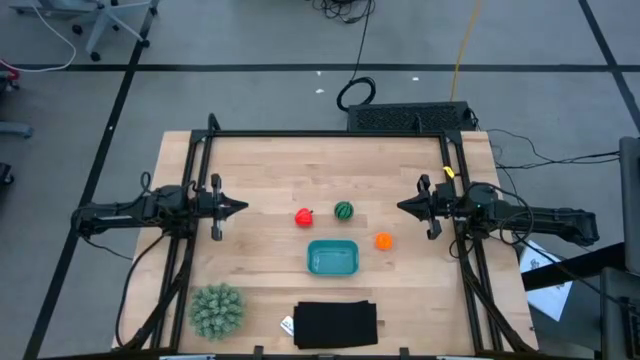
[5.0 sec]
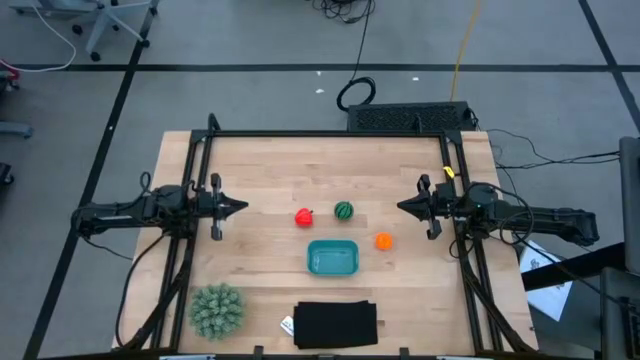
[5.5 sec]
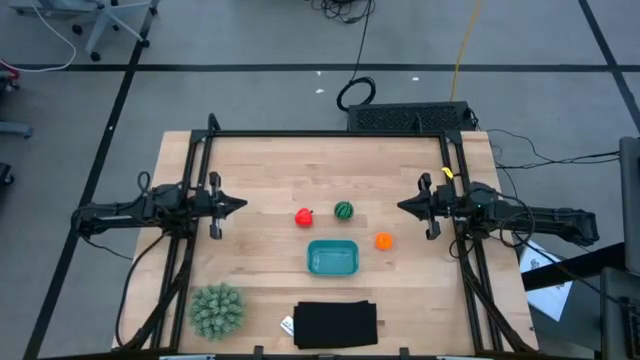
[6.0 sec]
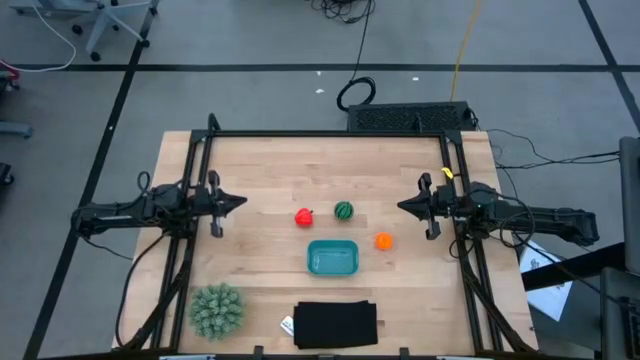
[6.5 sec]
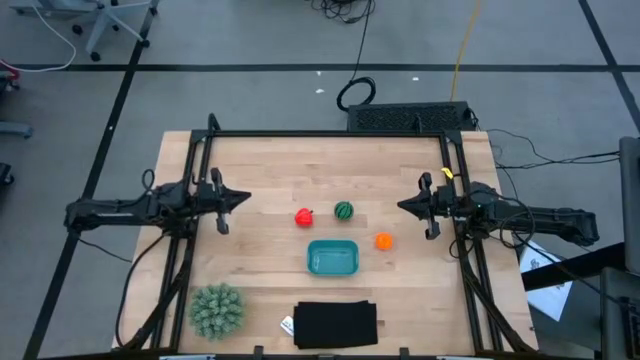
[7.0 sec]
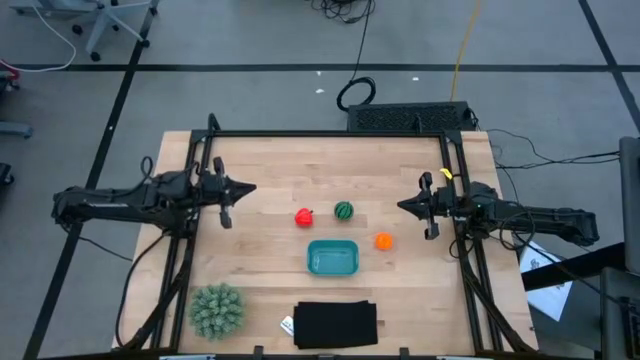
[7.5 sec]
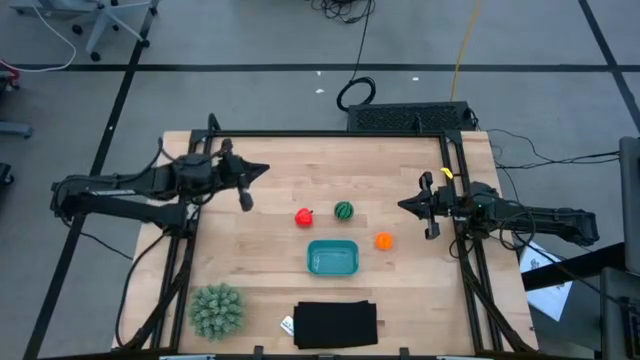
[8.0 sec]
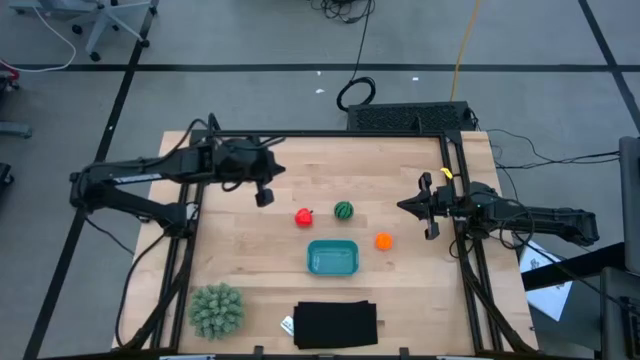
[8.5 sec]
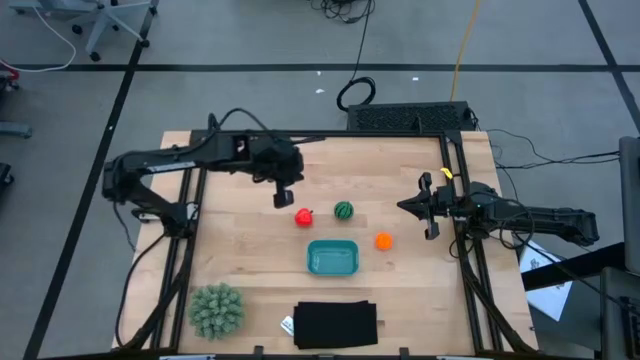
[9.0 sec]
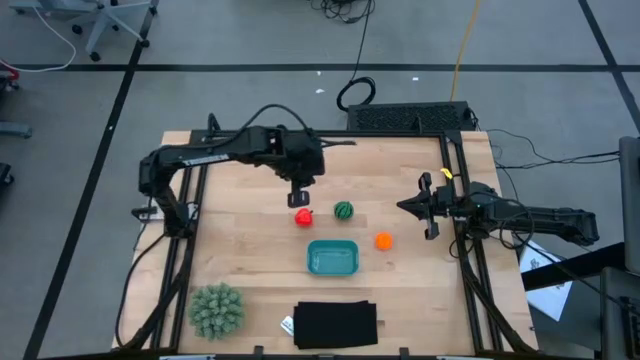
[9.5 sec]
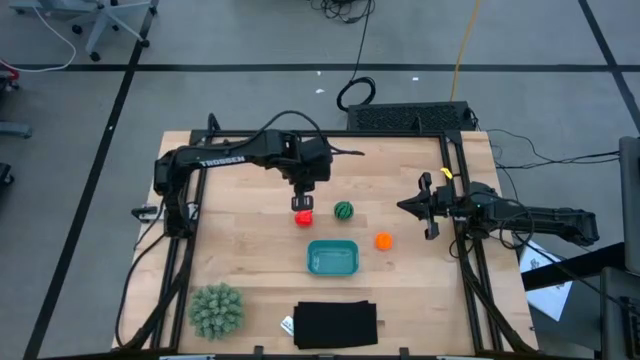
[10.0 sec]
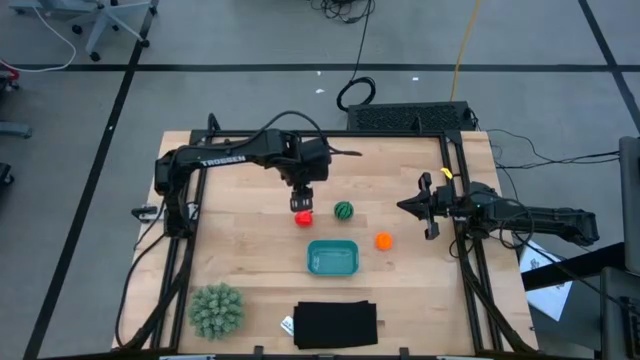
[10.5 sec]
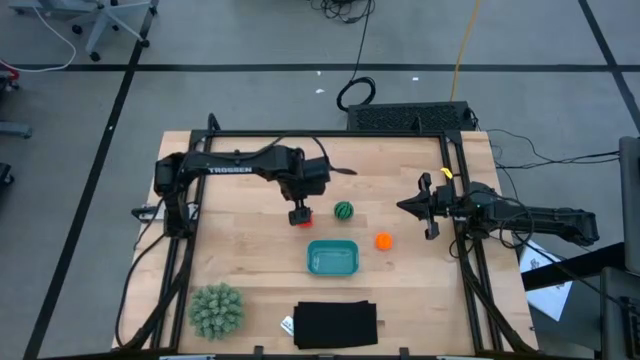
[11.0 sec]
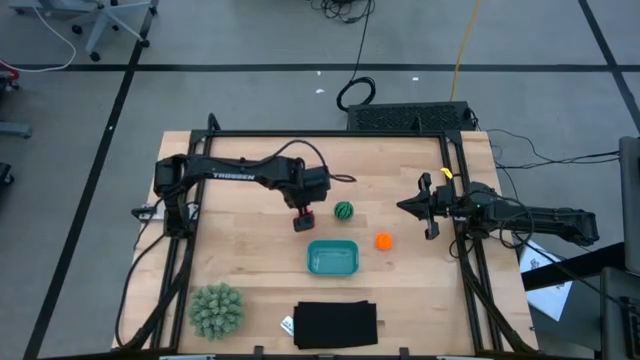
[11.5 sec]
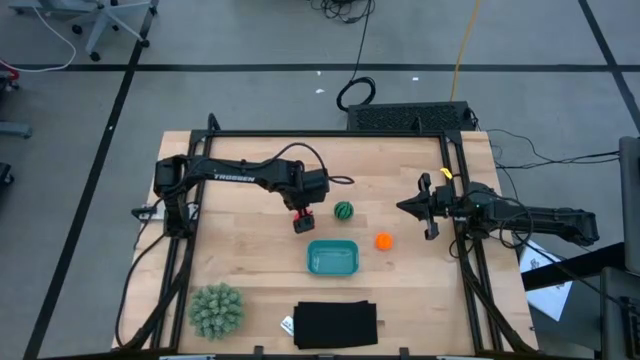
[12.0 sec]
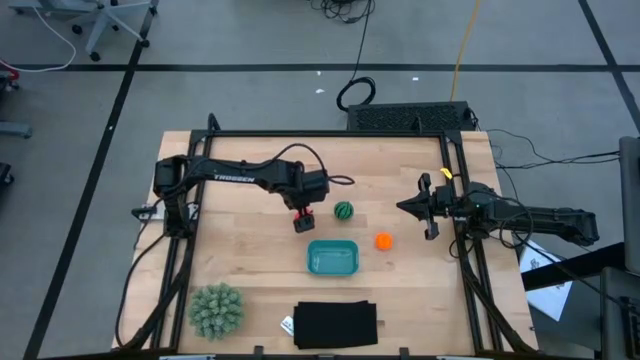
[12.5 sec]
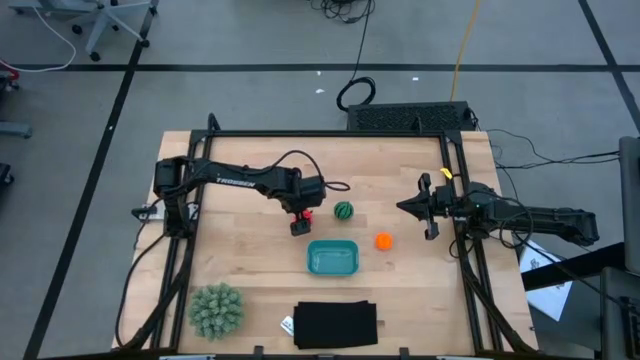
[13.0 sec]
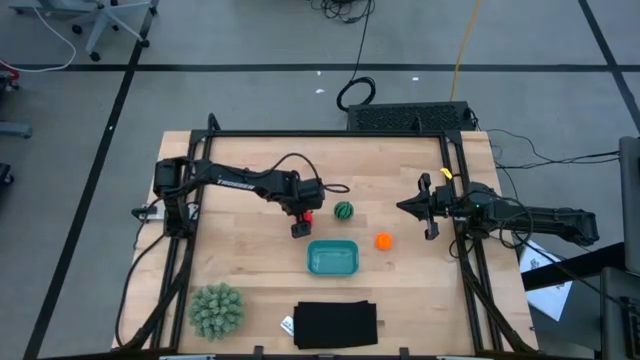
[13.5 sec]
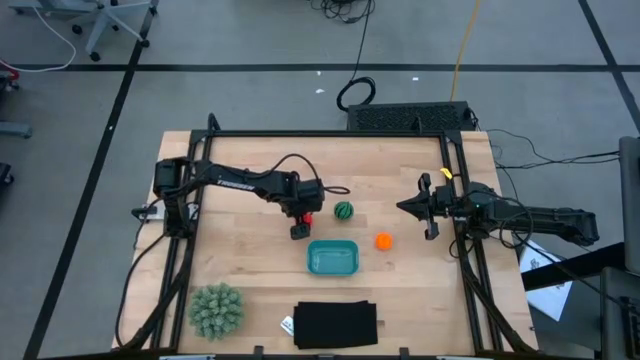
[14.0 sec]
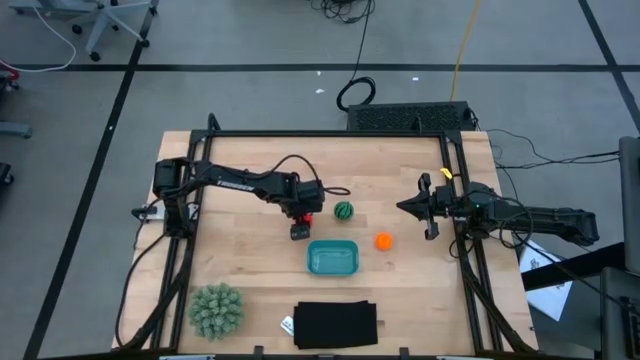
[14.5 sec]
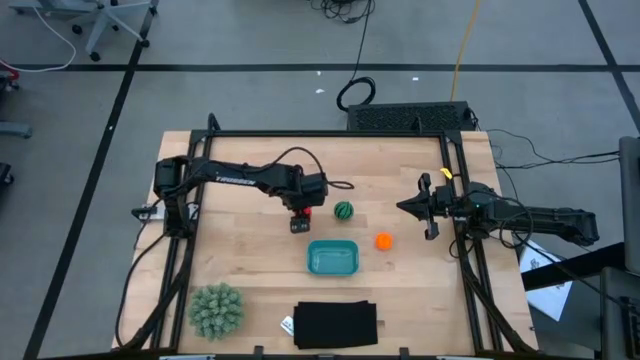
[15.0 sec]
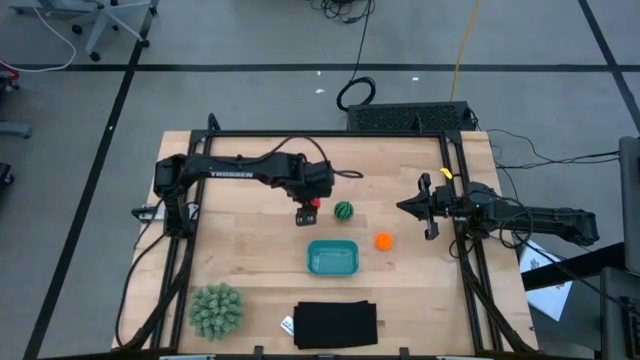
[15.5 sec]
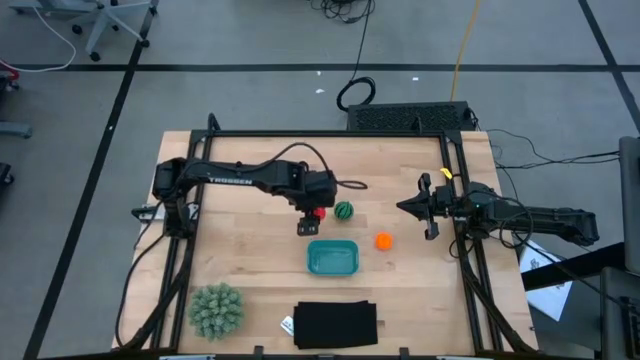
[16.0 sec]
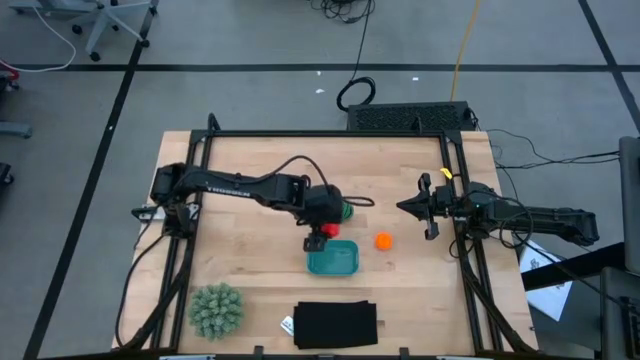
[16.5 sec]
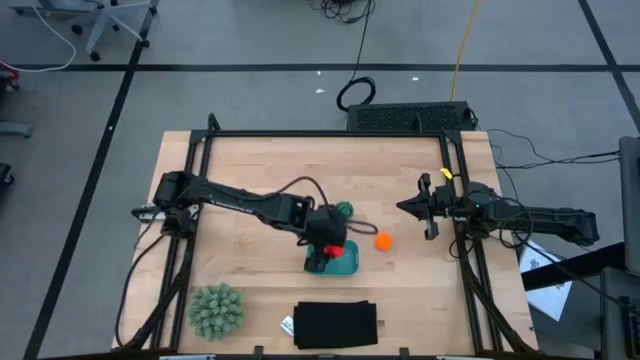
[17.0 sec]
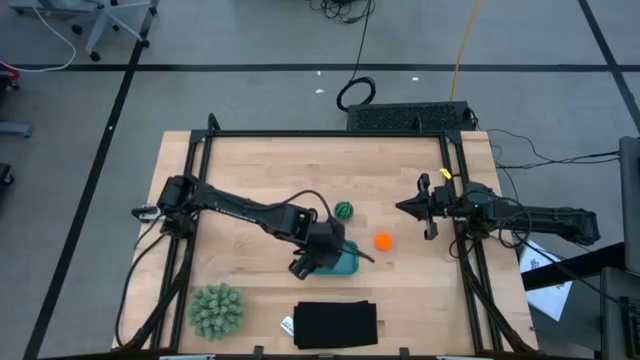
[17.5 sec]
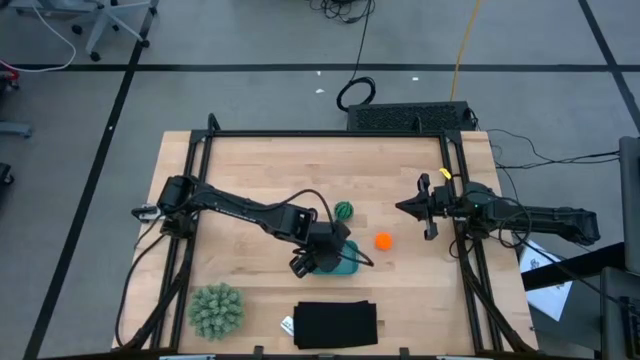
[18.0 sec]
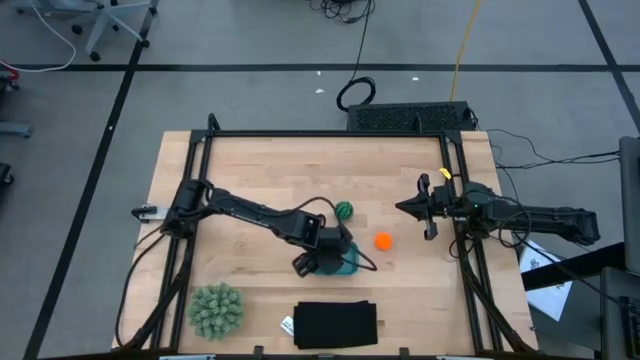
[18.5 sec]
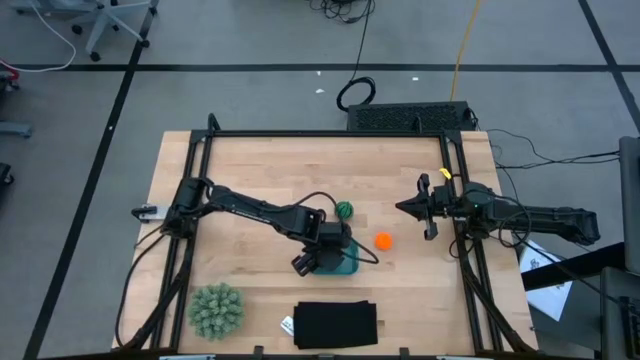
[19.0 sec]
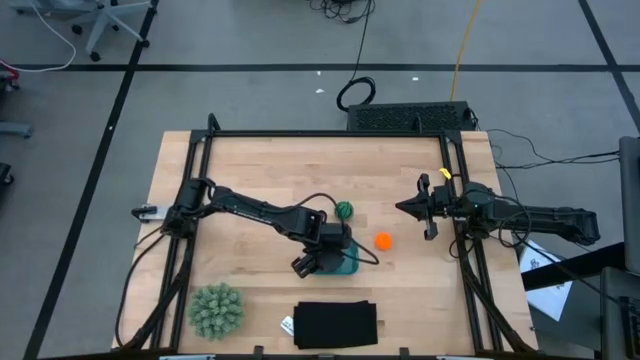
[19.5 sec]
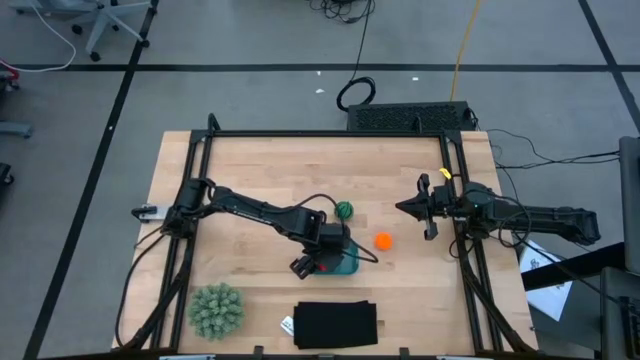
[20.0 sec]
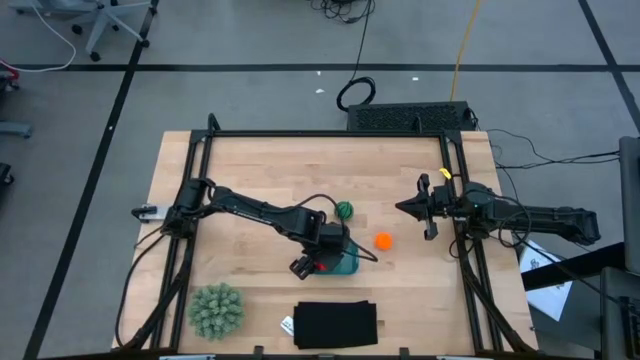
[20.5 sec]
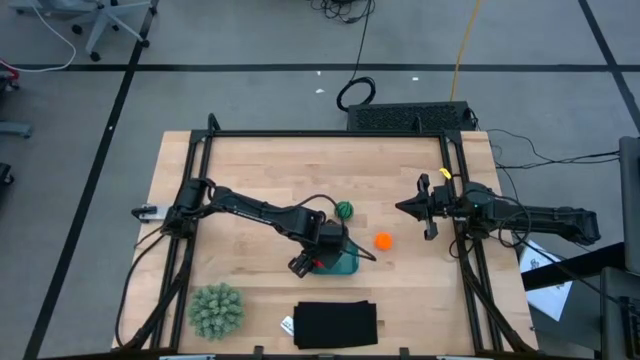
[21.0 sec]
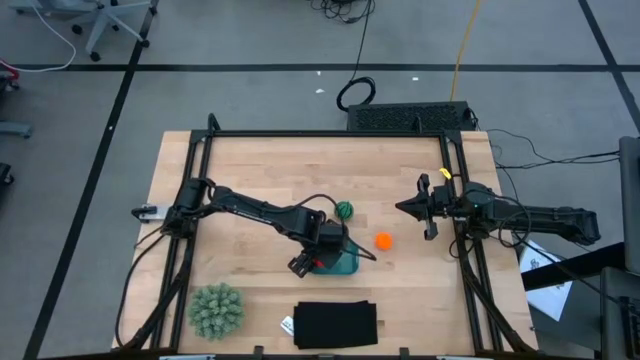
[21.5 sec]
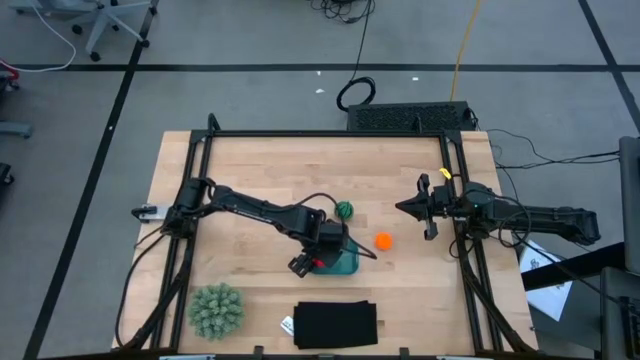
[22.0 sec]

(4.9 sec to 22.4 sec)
Task: Pick and placing Produce into tupperware
Put the red apple into the blue bin

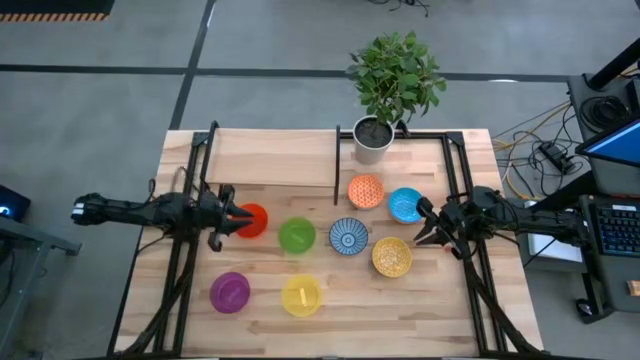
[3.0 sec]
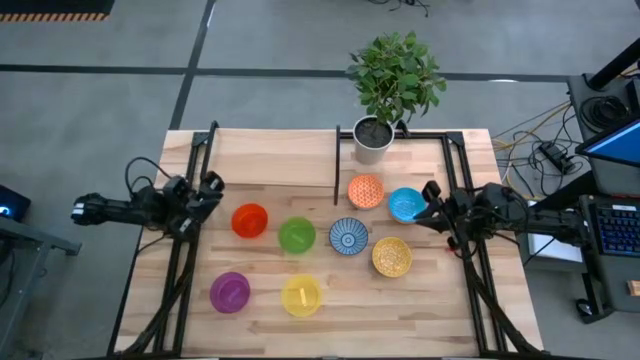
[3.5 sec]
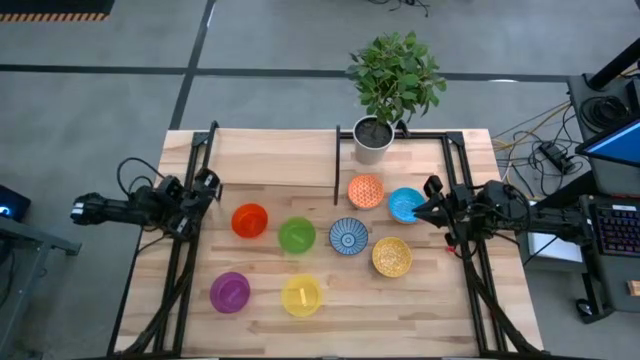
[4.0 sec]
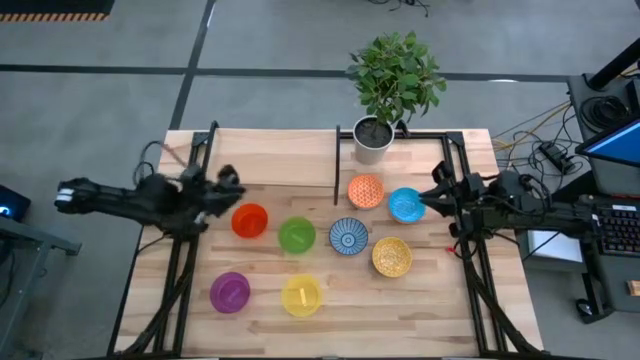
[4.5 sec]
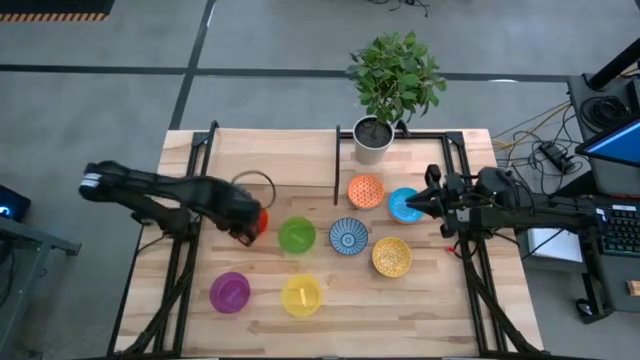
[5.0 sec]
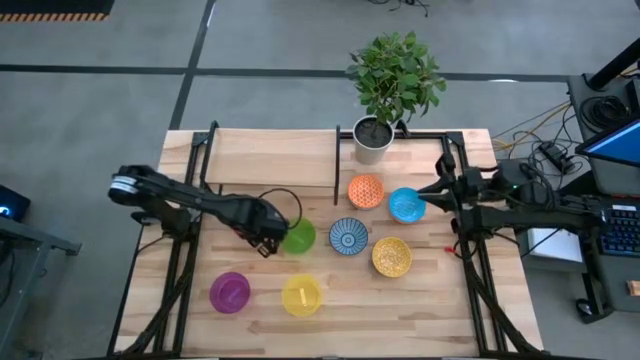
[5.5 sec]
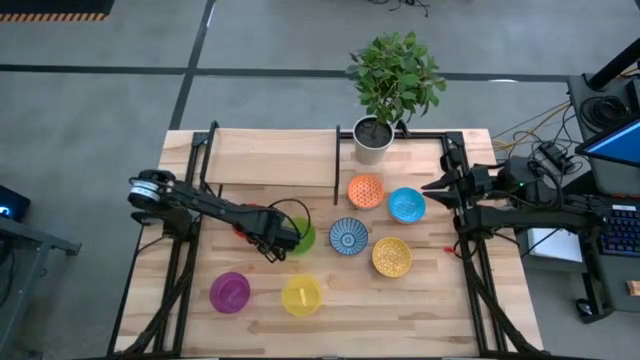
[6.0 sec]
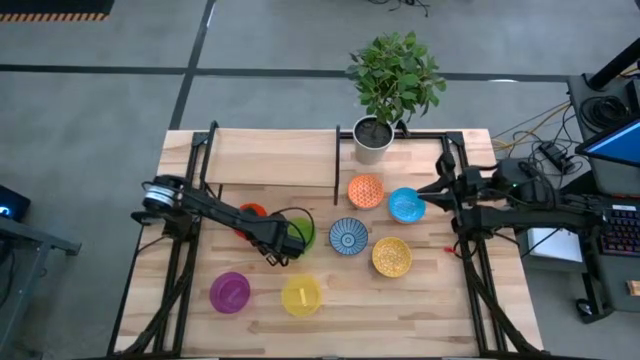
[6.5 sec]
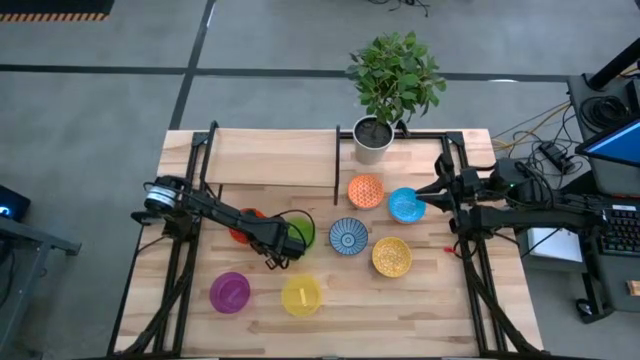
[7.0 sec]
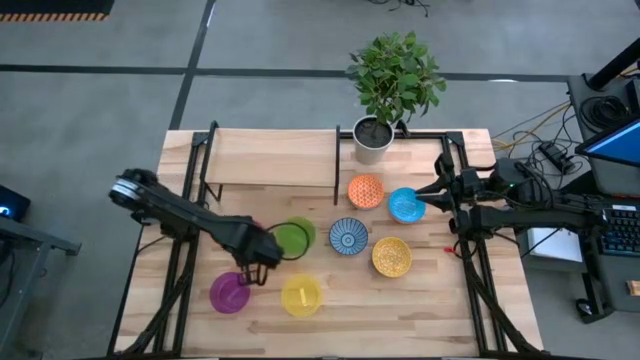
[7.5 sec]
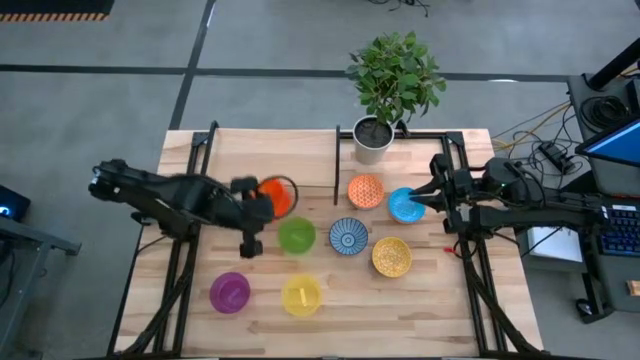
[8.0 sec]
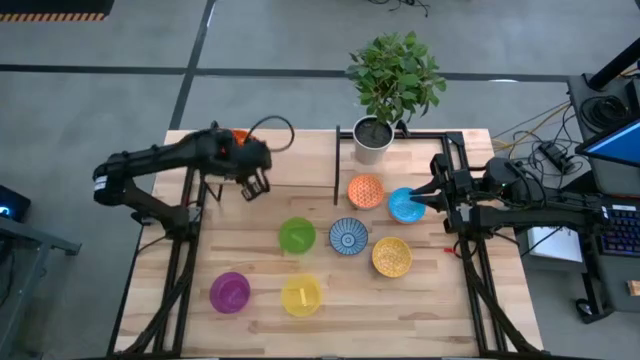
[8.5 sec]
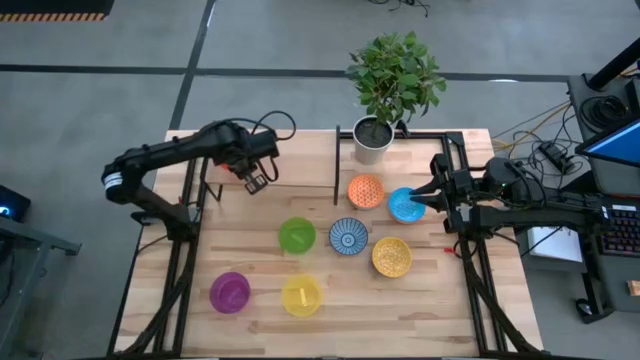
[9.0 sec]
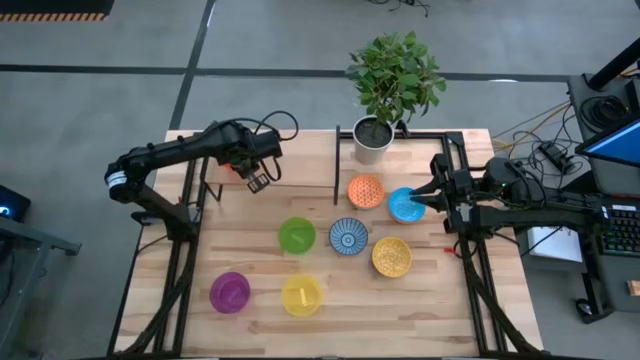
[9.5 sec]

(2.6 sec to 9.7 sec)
Task: Place and stack bowls onto a shelf
Put the orange bowl on the shelf
